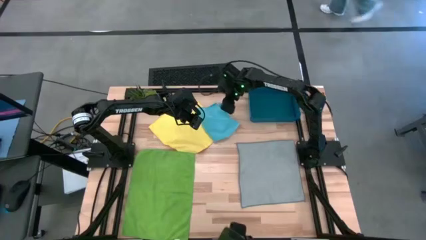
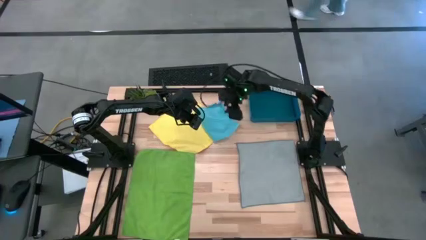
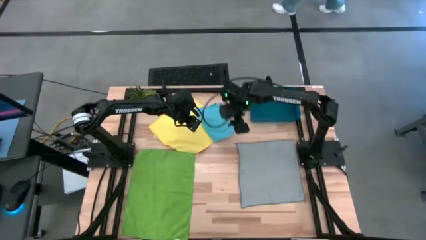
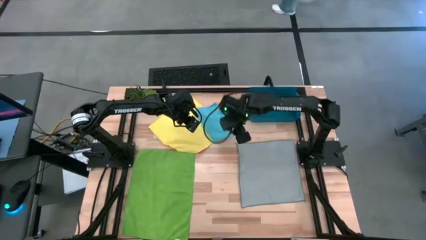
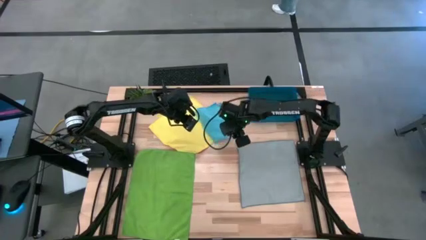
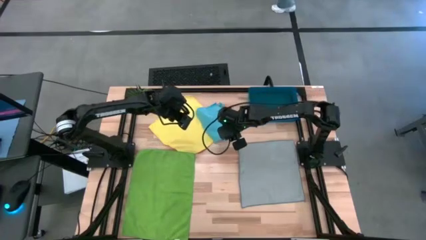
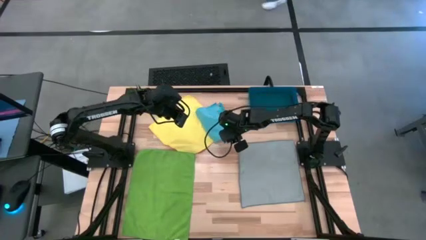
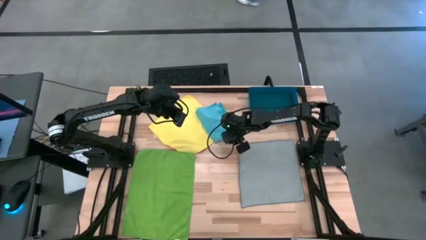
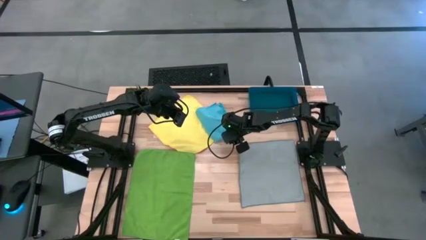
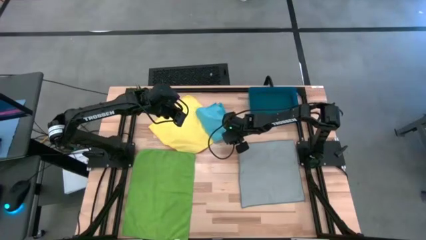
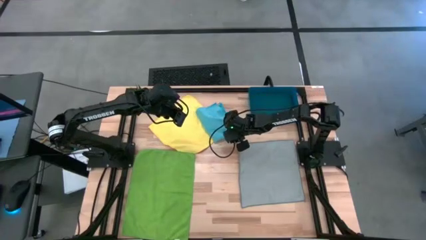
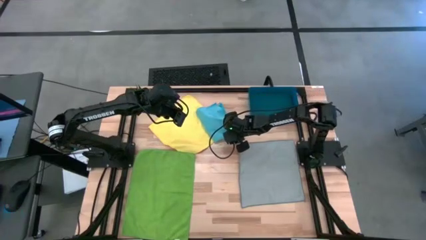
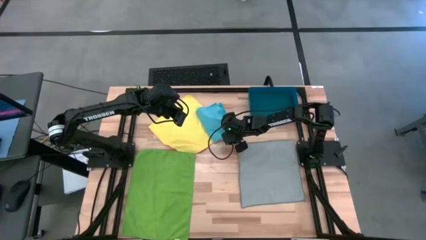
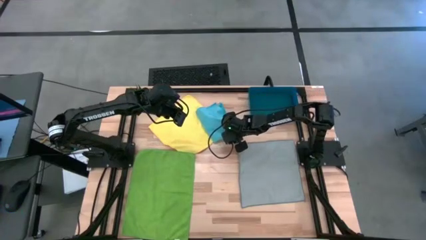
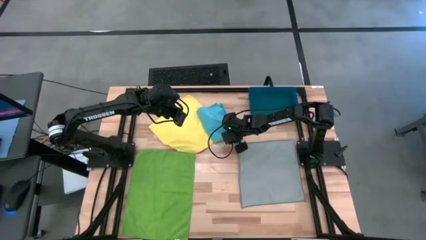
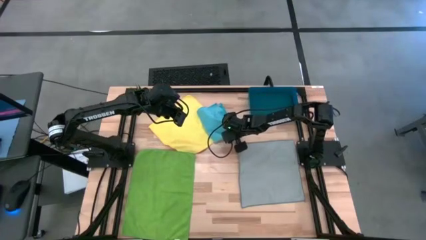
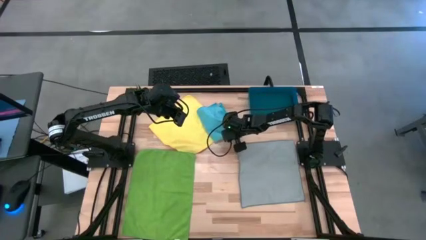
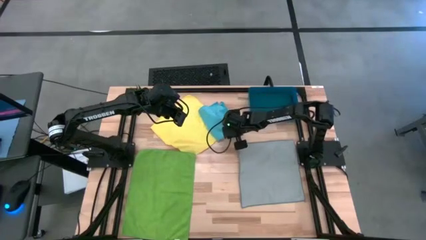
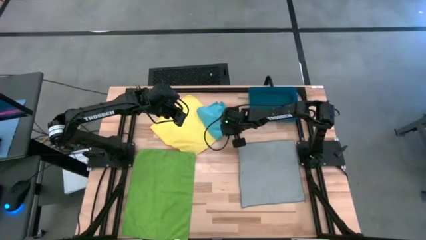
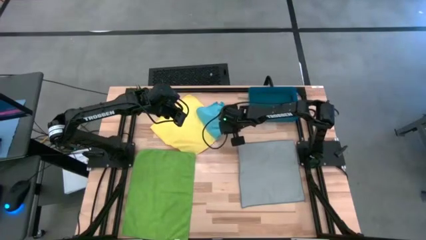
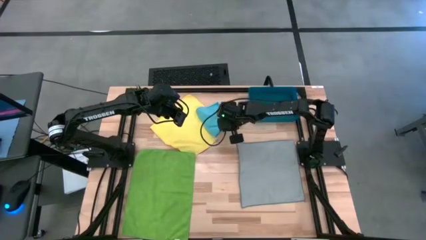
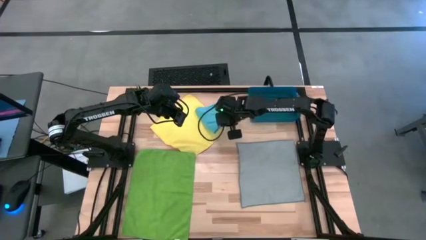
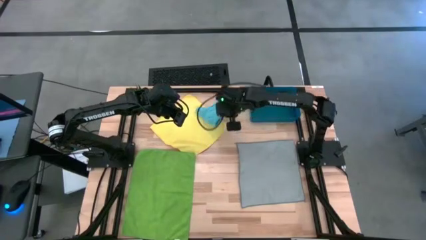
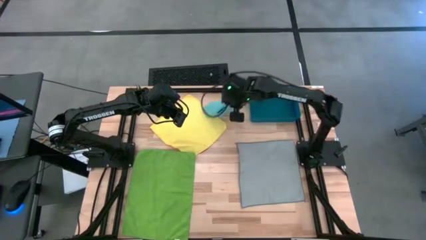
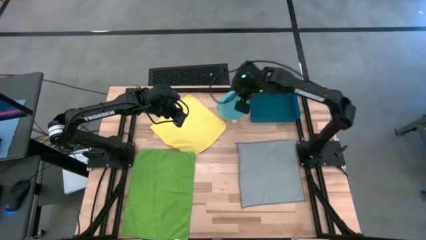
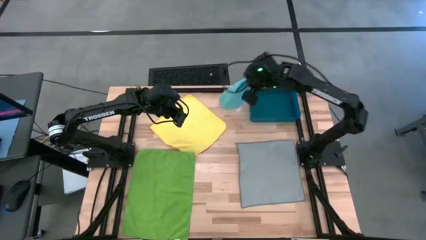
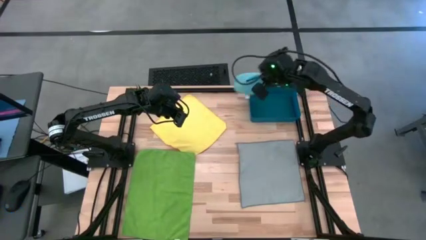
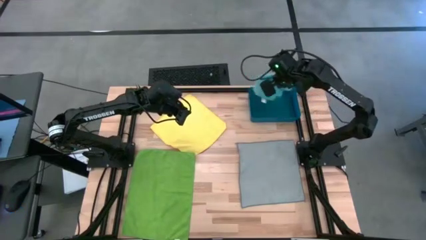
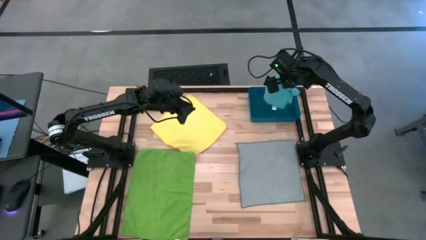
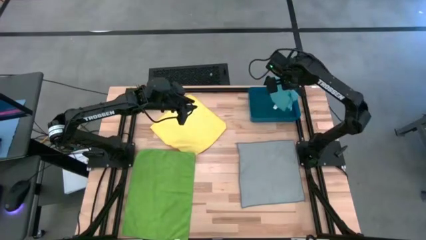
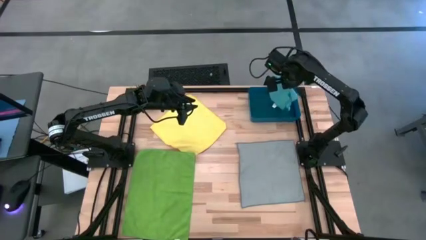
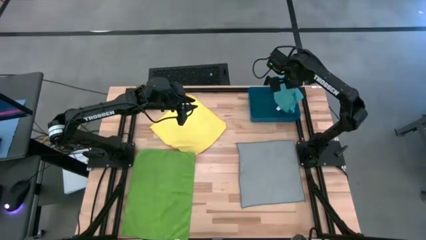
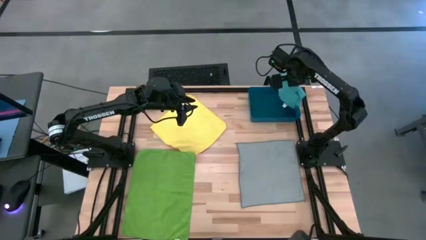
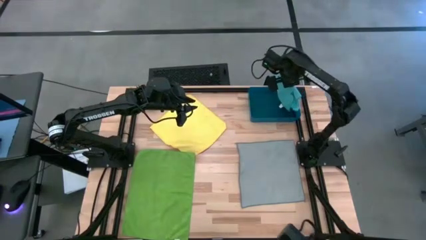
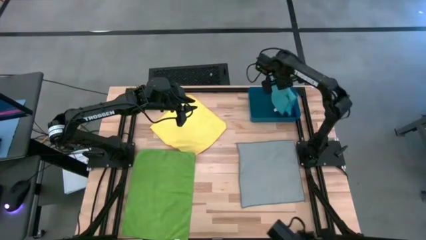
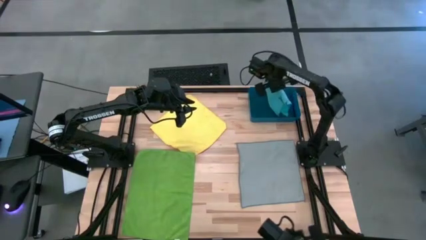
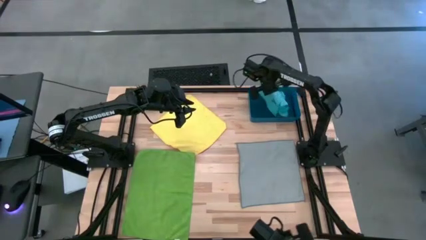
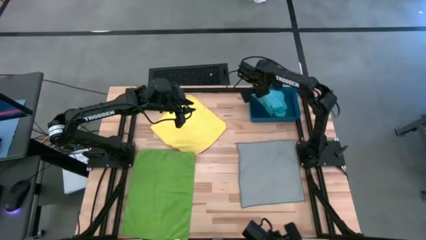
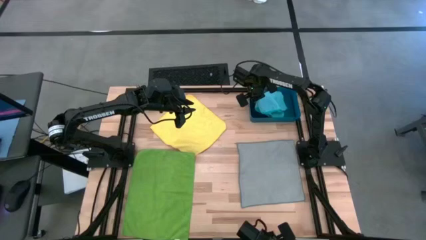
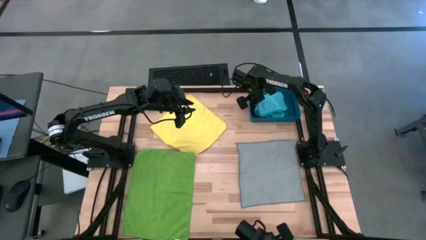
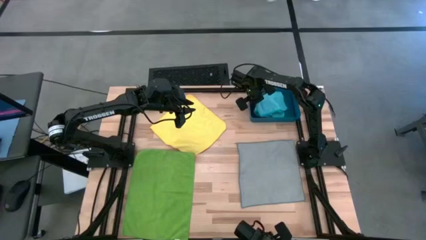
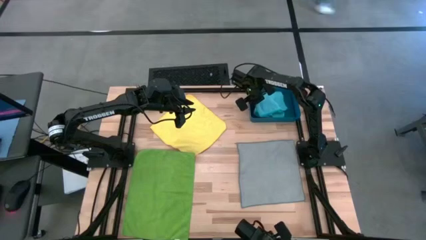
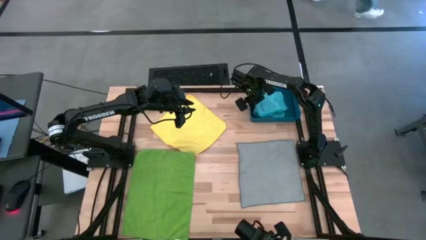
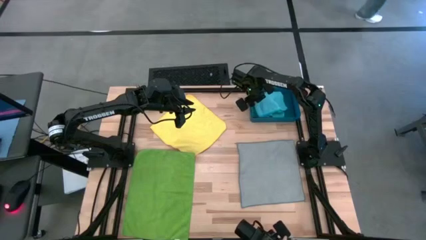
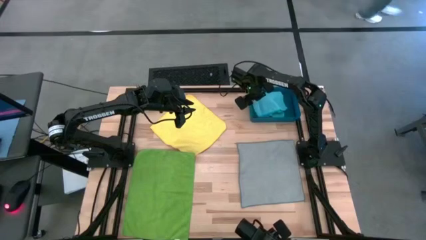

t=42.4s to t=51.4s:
Task: Fold microfiber towels
Put the blue microfiber cloth into the blue bin

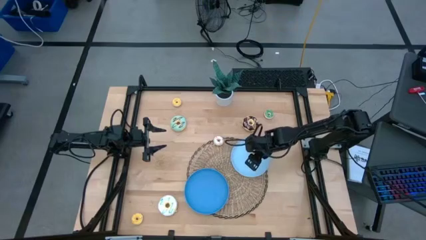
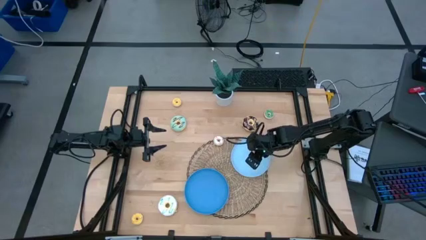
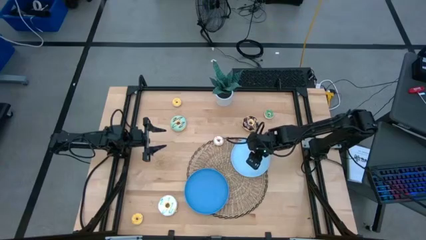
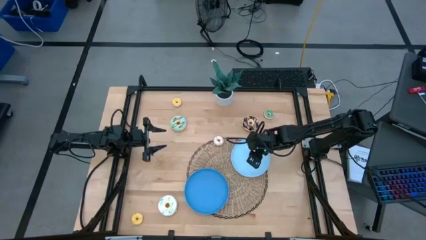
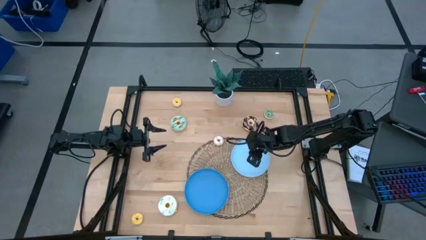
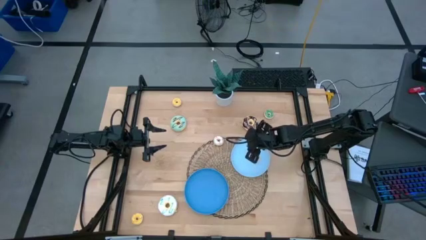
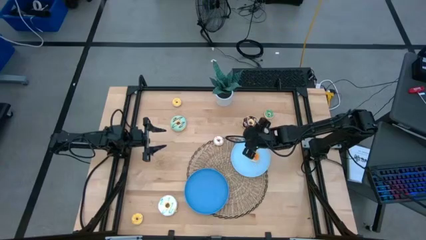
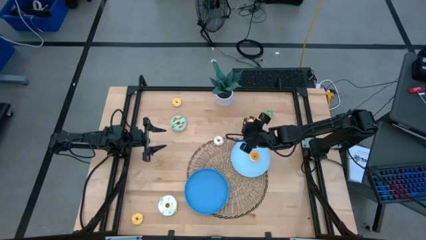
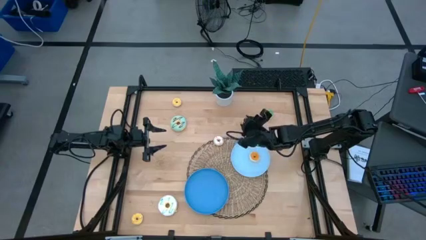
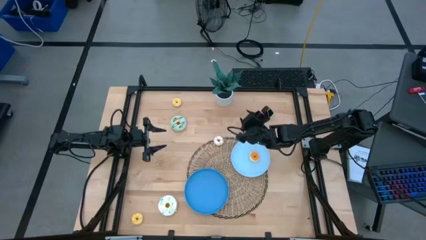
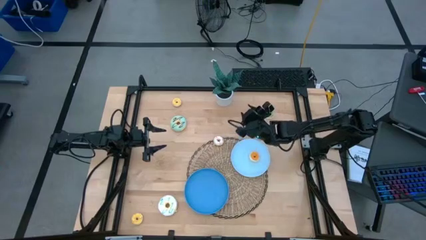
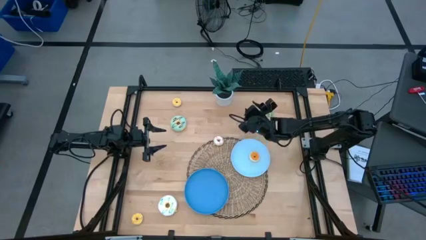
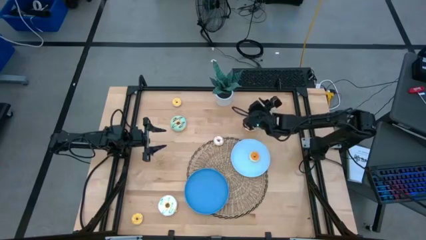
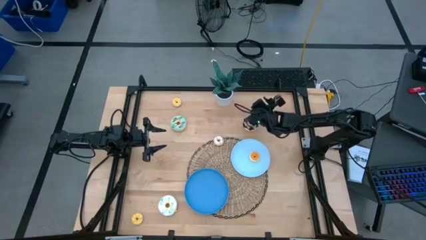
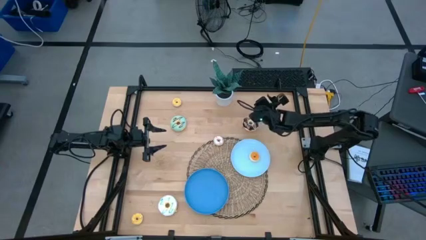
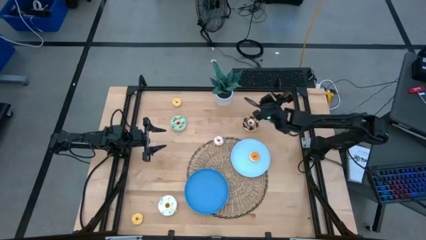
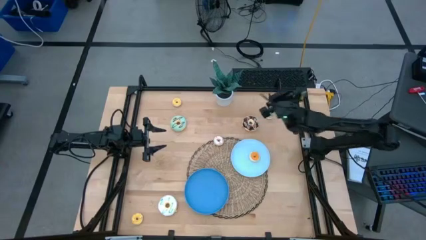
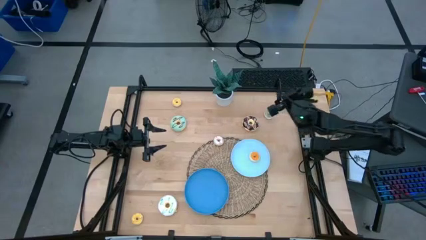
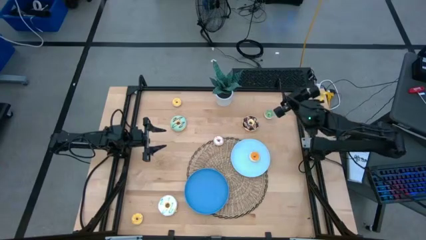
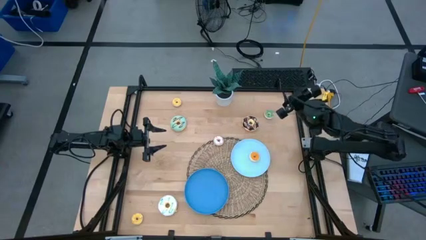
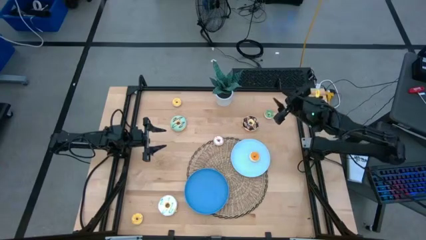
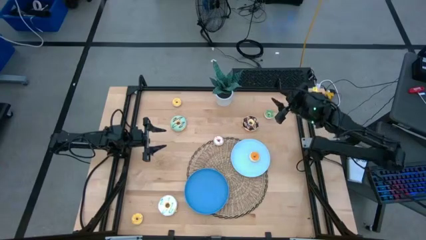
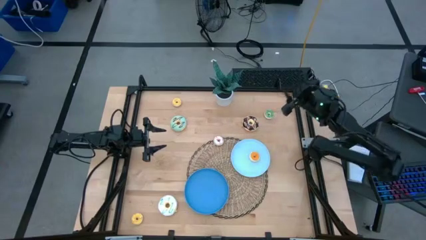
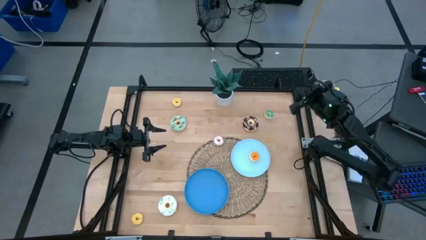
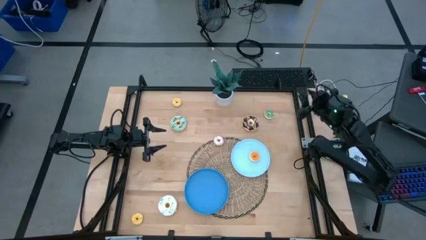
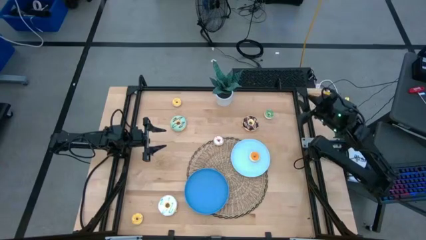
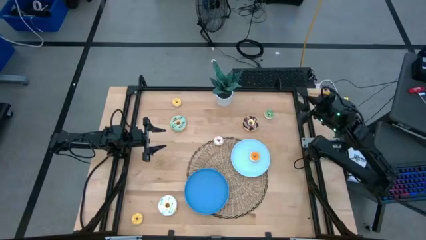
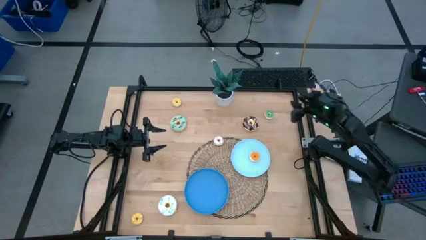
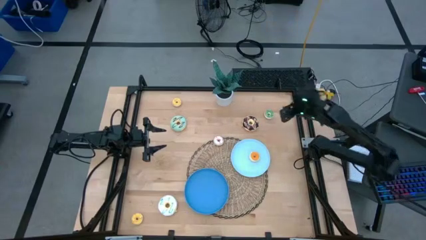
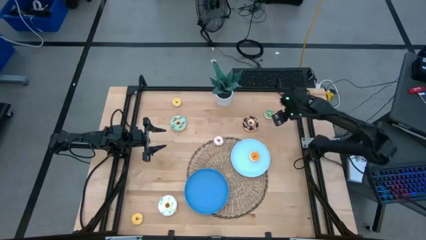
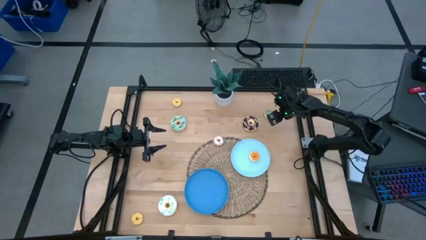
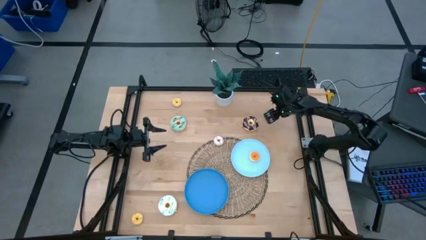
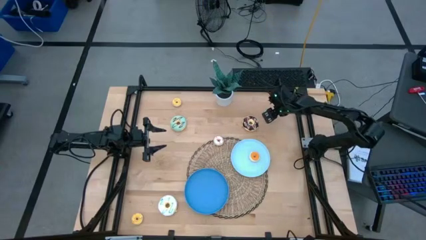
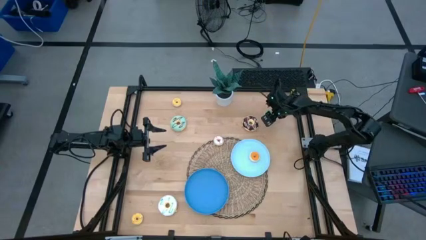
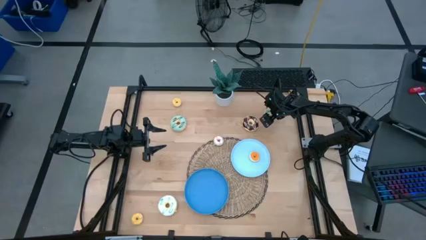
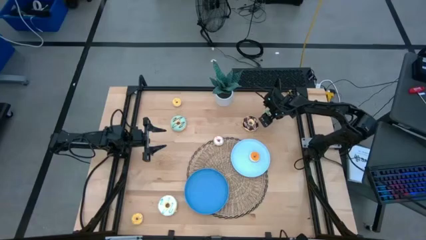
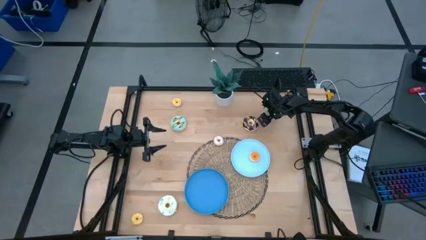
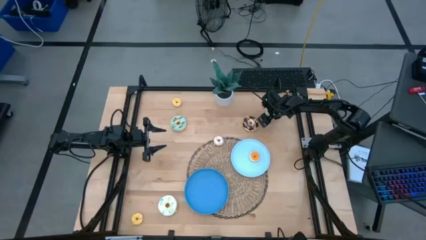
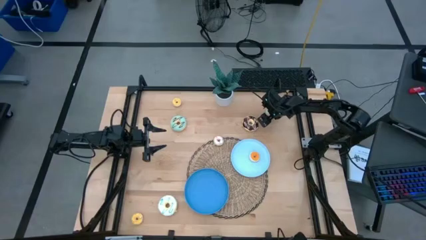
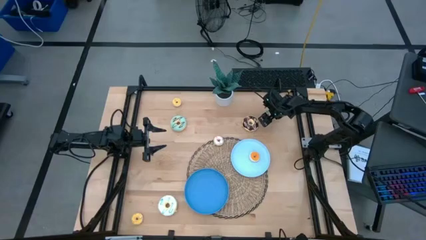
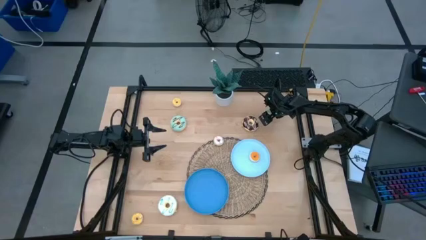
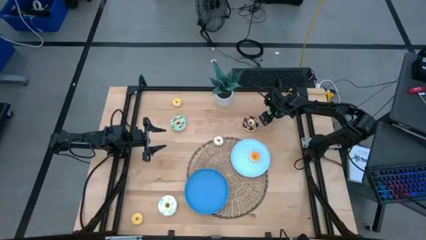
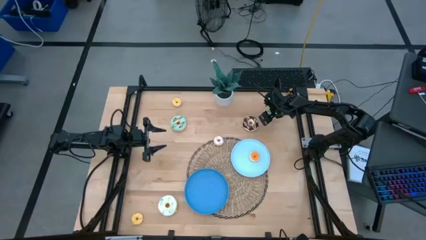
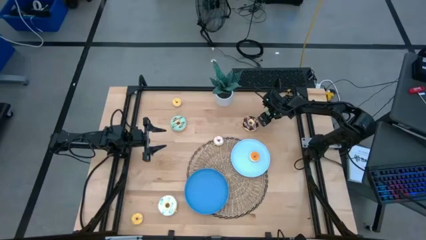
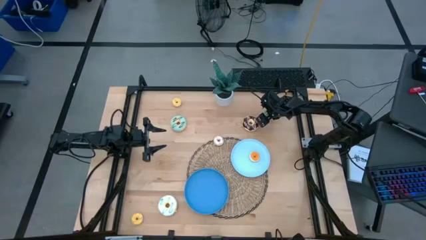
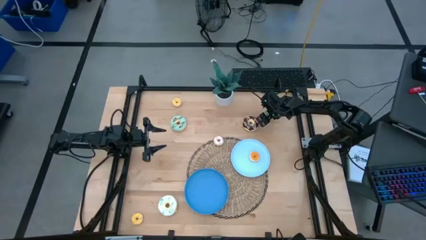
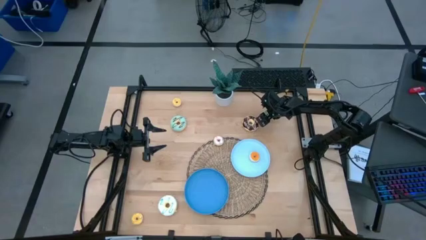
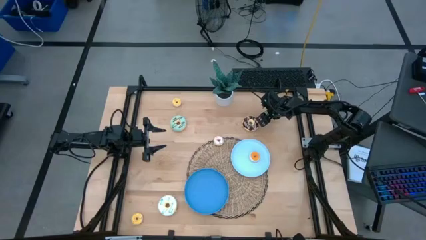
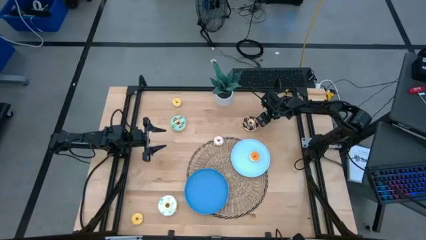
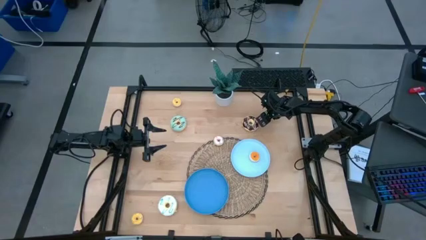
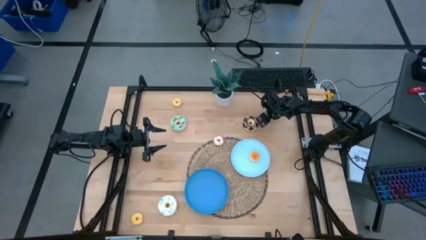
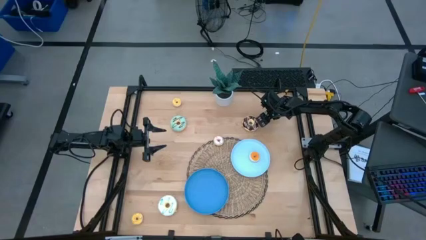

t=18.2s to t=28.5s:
Task: Pick & Place donuts
Put the small green donut on the light blue plate
